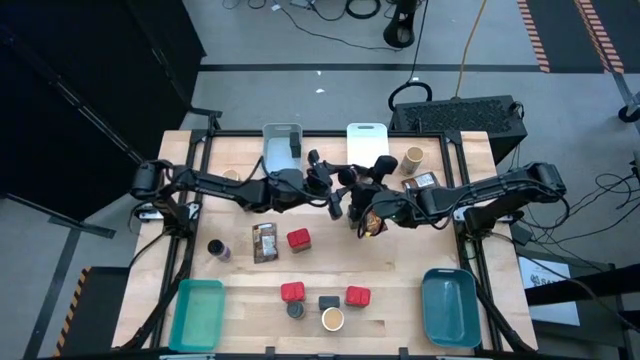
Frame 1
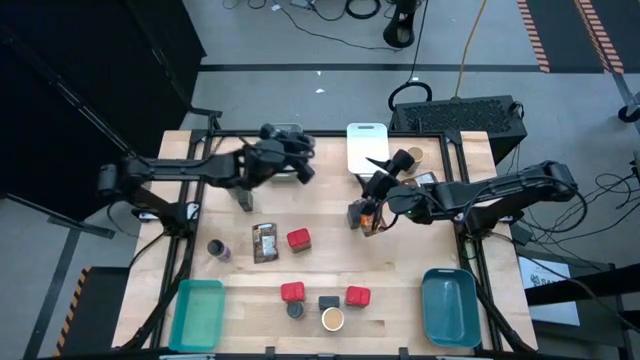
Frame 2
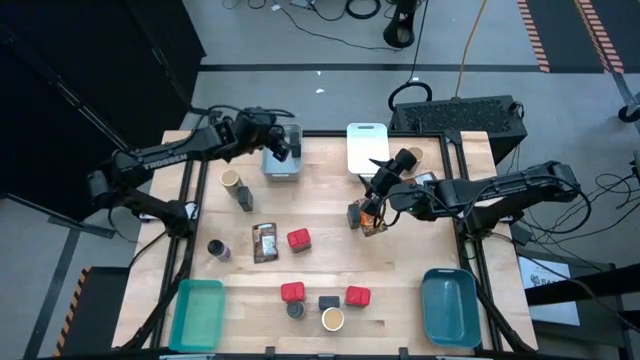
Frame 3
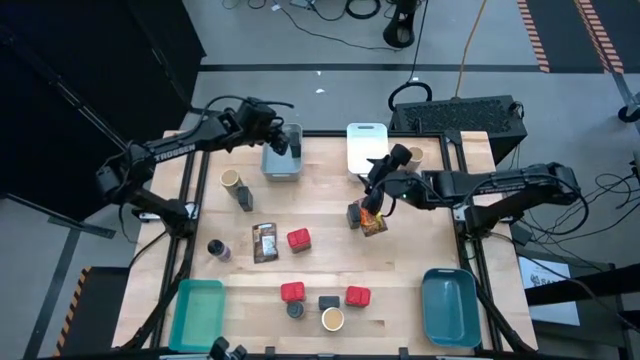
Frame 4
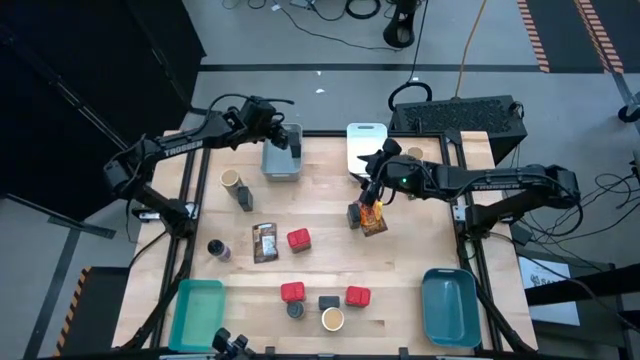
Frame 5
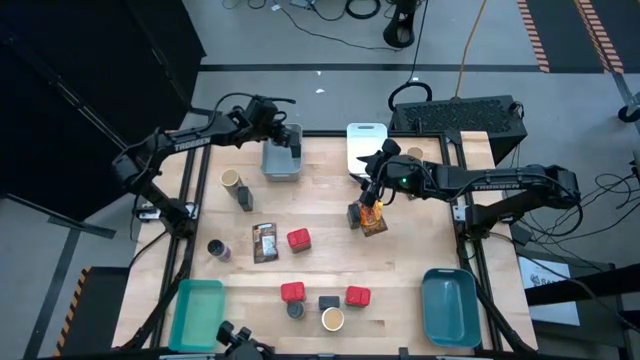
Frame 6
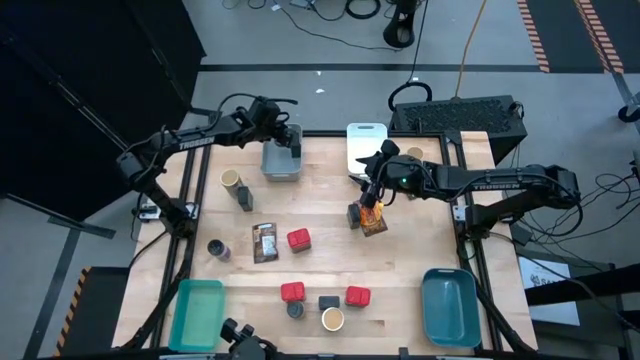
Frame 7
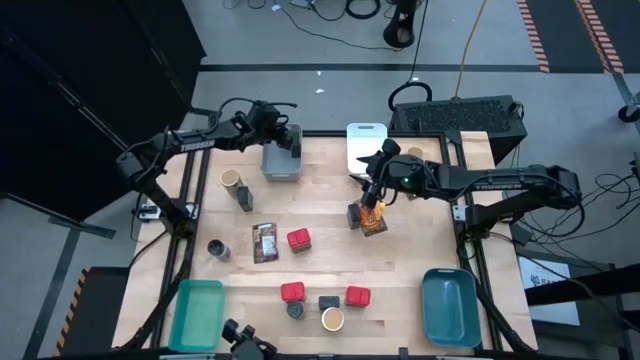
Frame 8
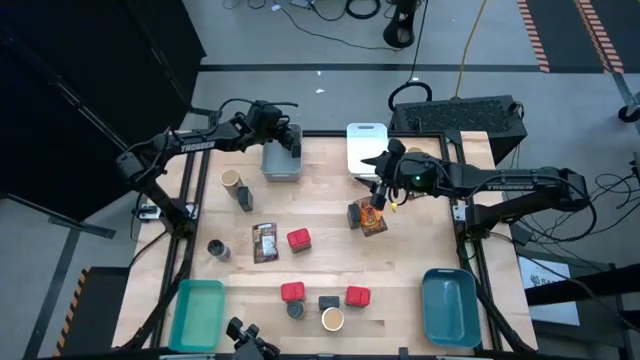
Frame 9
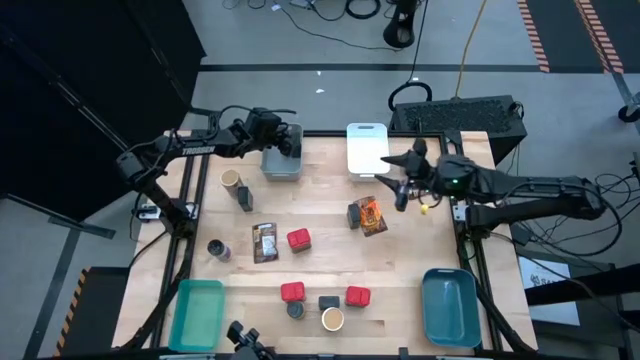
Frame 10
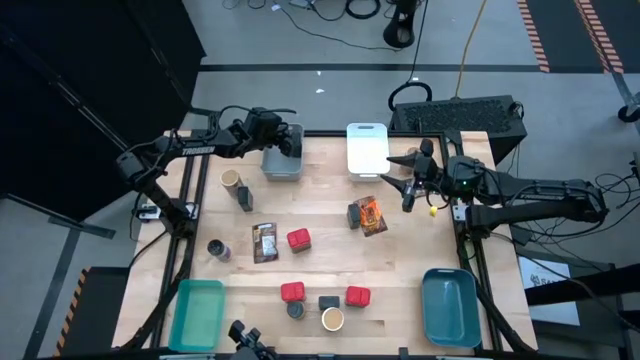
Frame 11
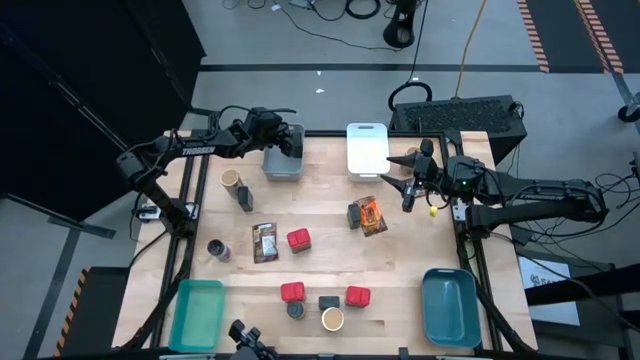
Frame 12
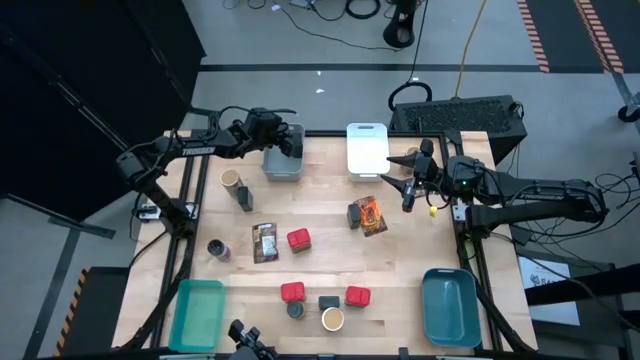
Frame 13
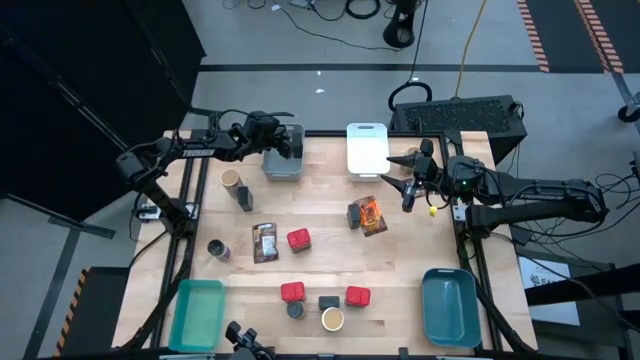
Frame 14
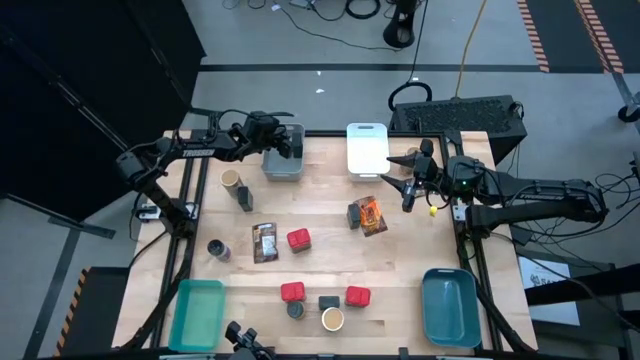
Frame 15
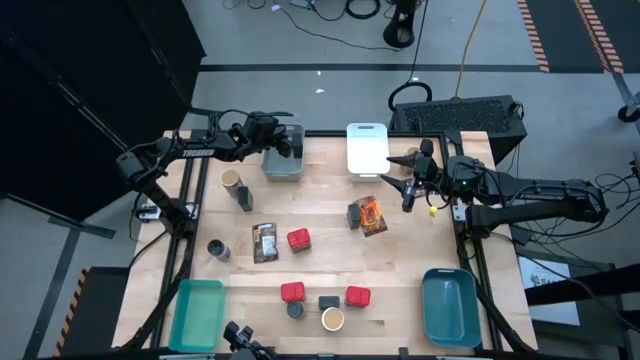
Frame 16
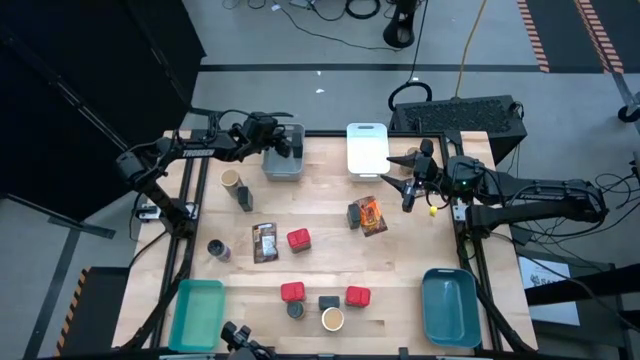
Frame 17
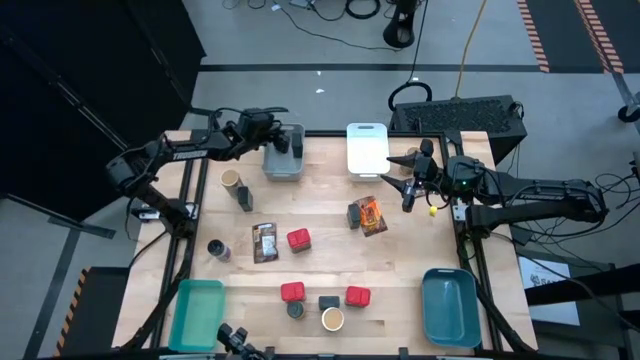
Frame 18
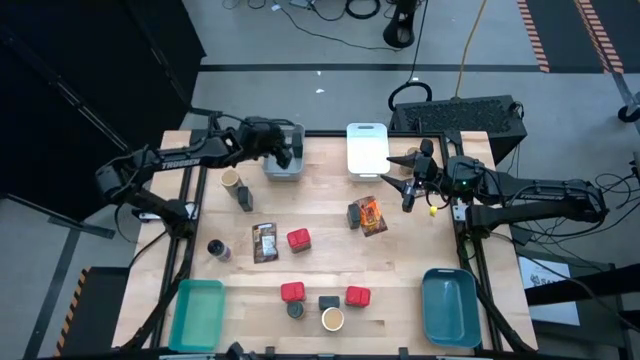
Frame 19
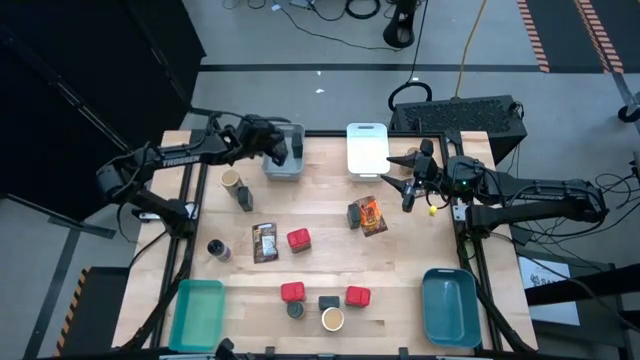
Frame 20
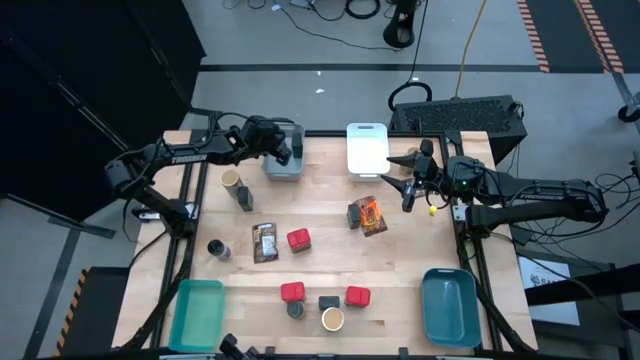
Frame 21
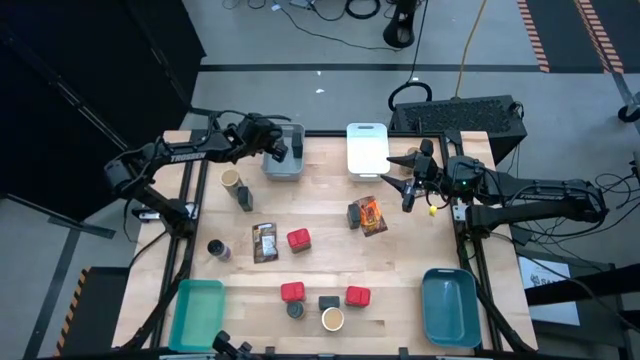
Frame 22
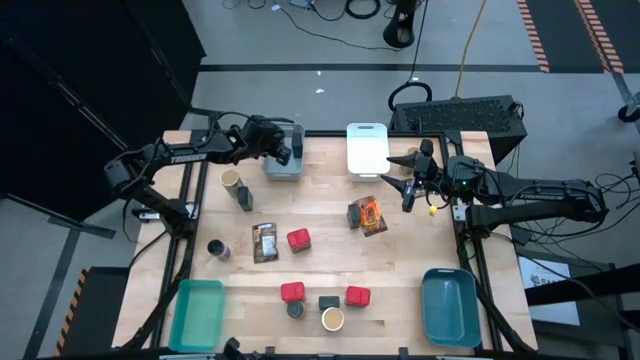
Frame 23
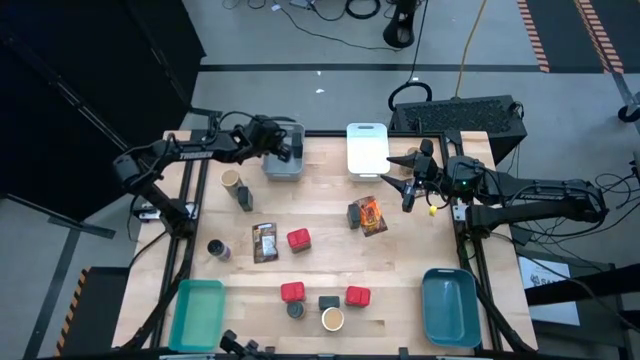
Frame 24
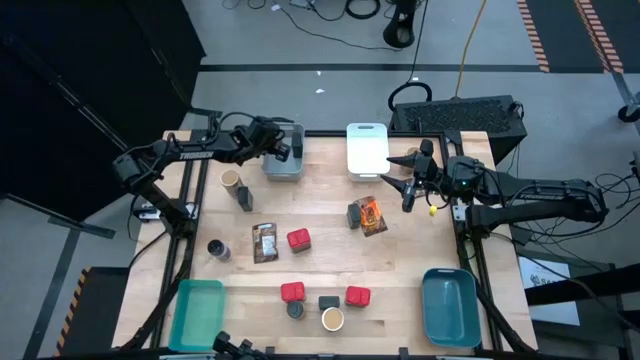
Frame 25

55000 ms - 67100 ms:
Task: Sort spices by type
Put the black spice bottle into the gray bin

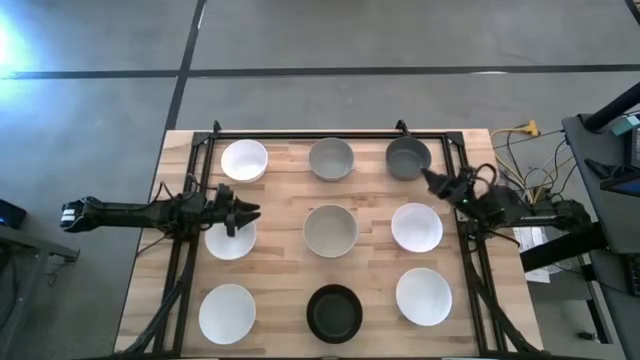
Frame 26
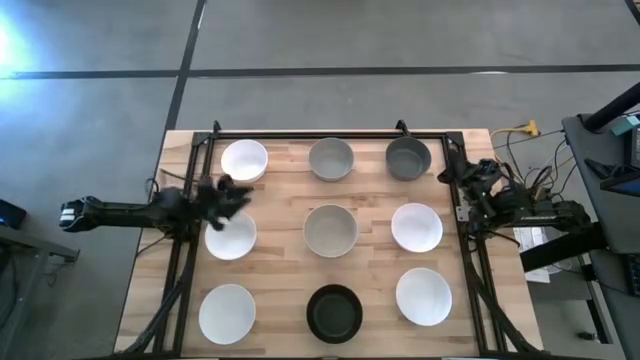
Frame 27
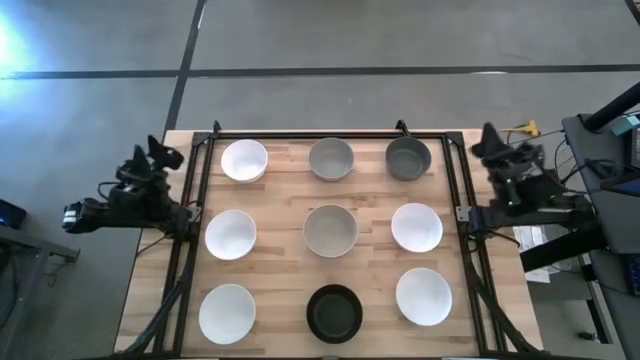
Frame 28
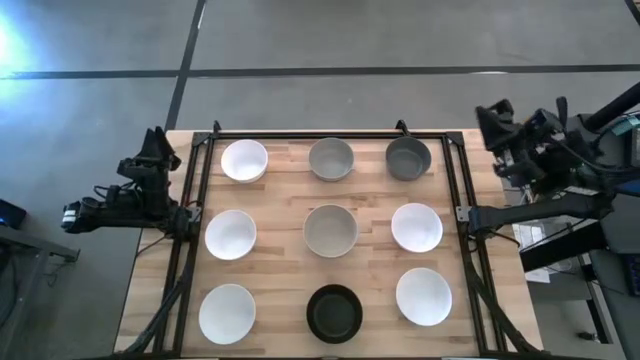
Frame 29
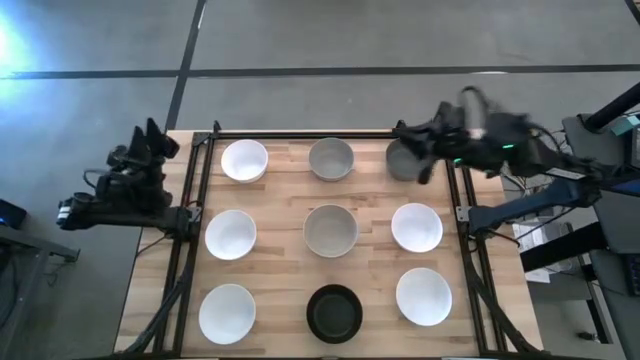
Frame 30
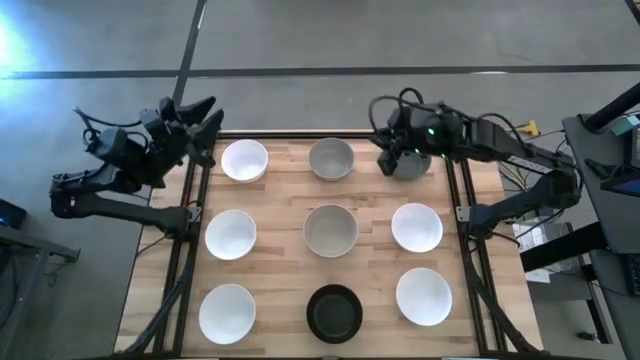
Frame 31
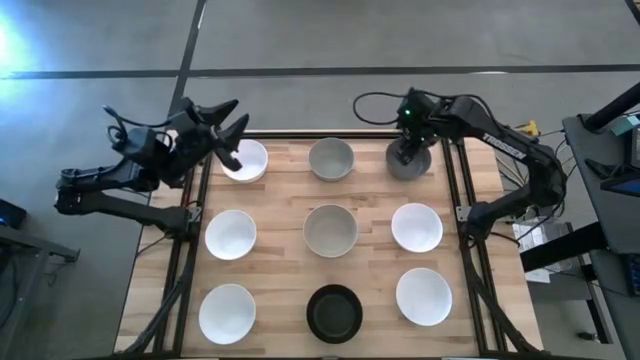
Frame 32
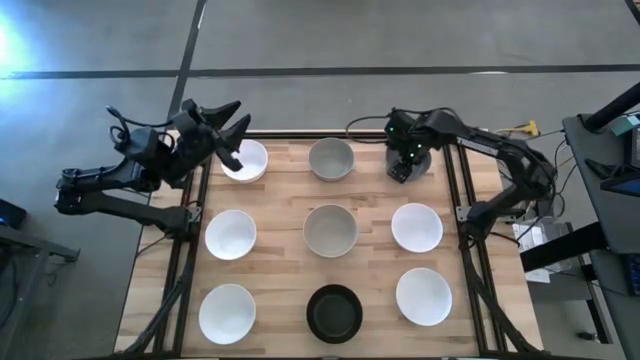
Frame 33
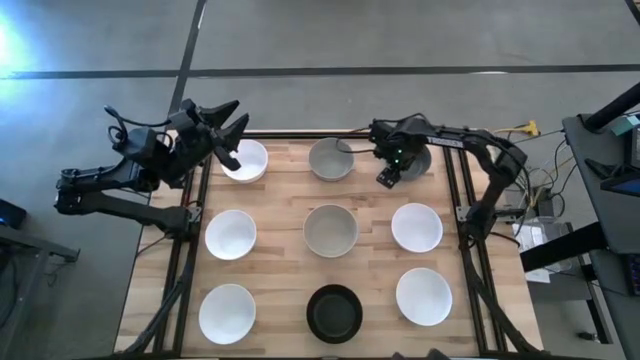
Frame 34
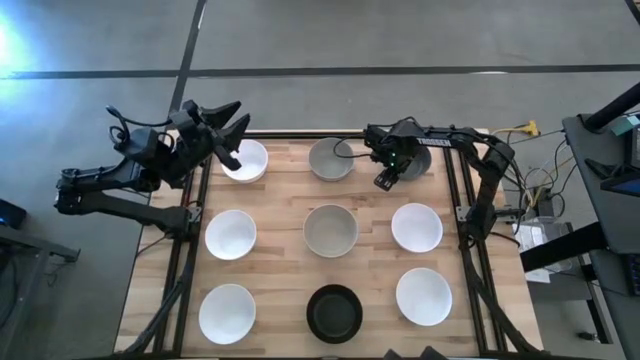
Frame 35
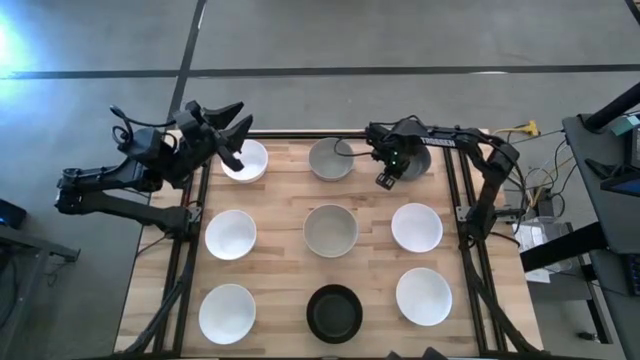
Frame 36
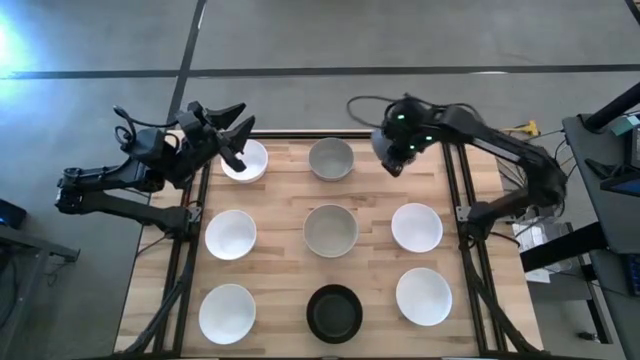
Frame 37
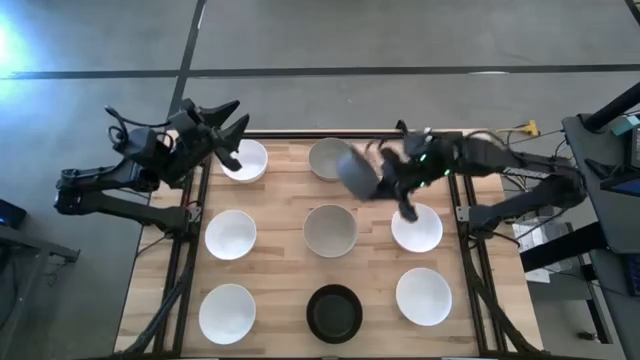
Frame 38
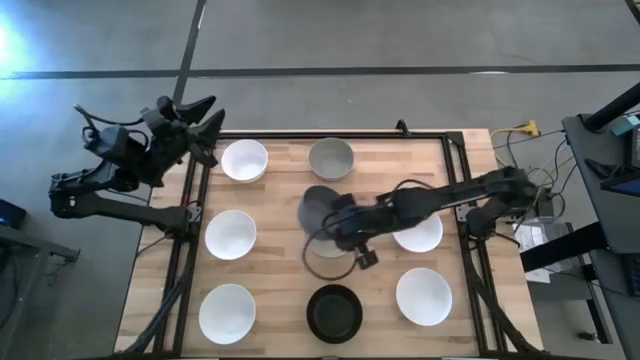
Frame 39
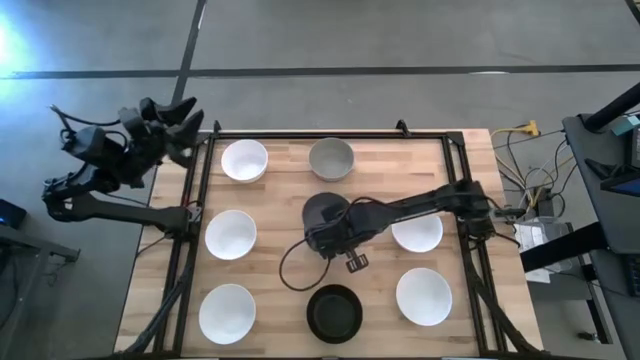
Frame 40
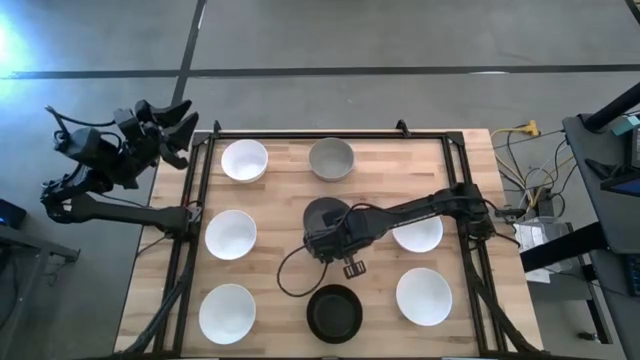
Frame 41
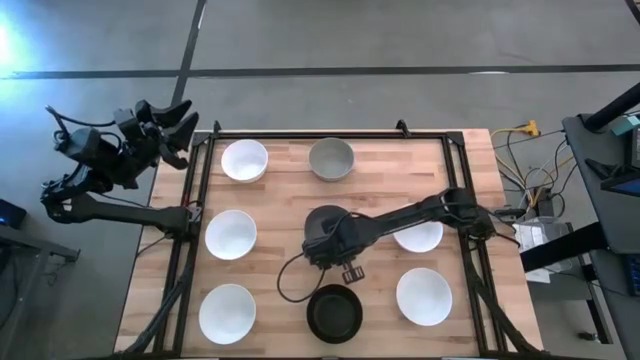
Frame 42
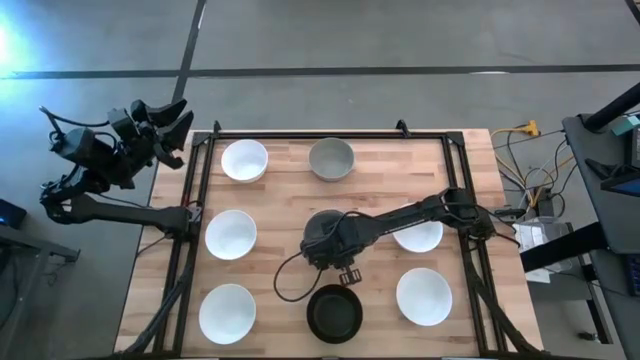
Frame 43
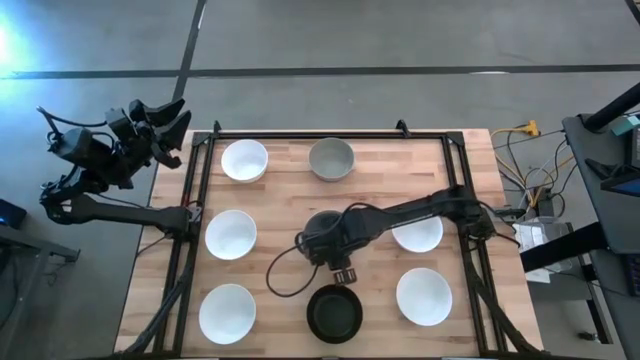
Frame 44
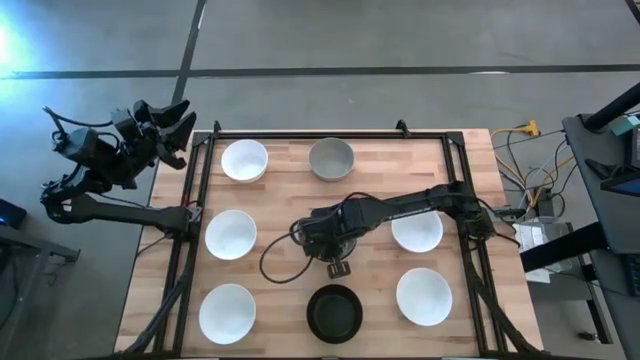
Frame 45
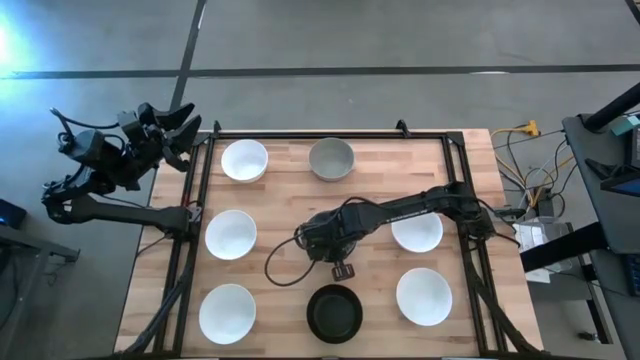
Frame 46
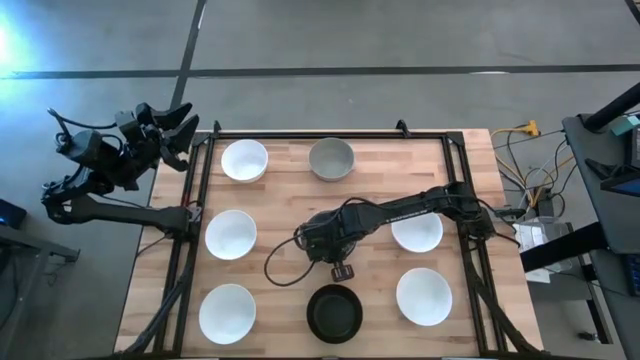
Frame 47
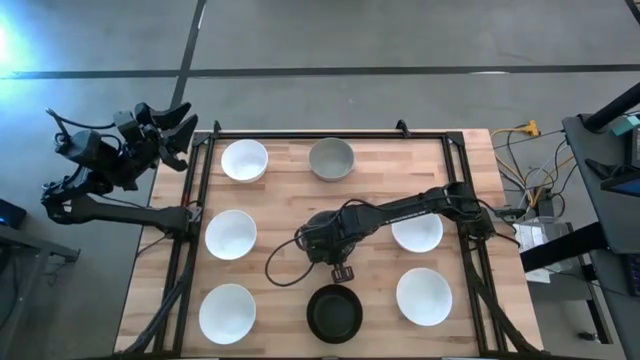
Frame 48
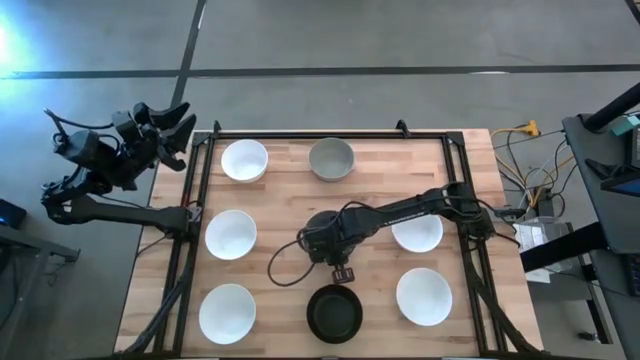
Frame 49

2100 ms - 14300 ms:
Task: Nest bowls inside each other
Stack the dark gray bowl on top of the light gray bowl
